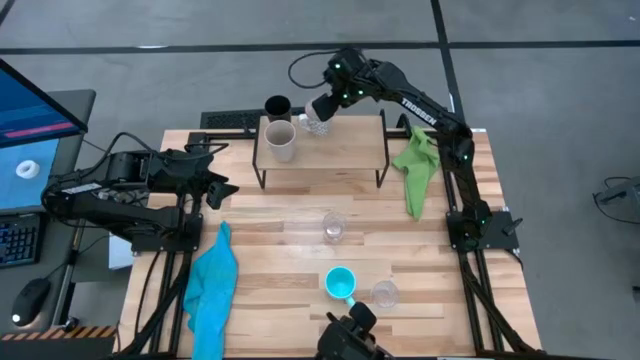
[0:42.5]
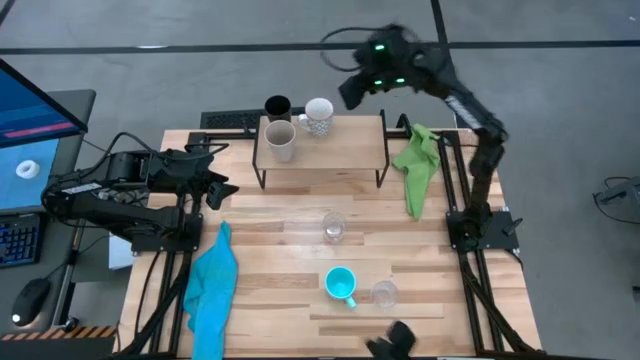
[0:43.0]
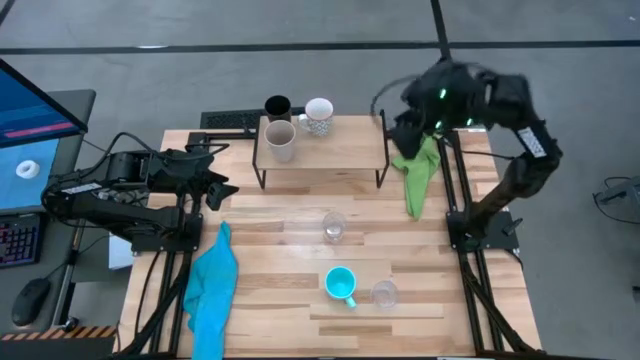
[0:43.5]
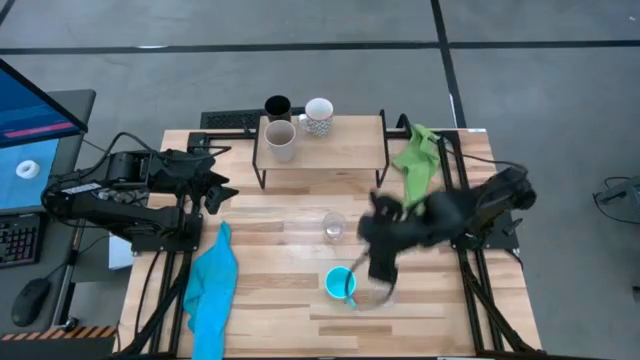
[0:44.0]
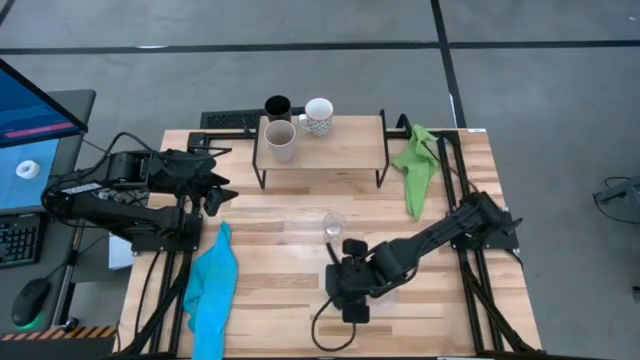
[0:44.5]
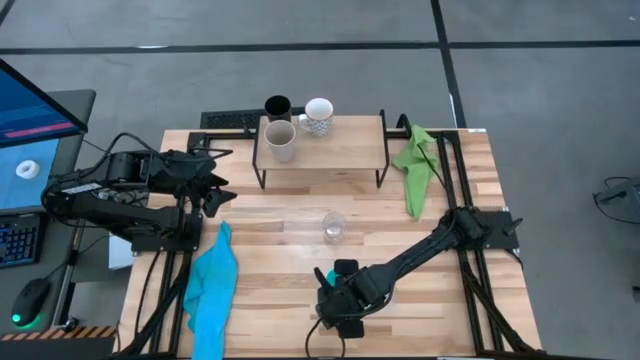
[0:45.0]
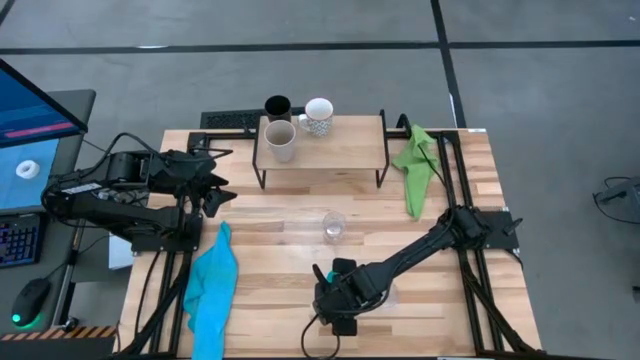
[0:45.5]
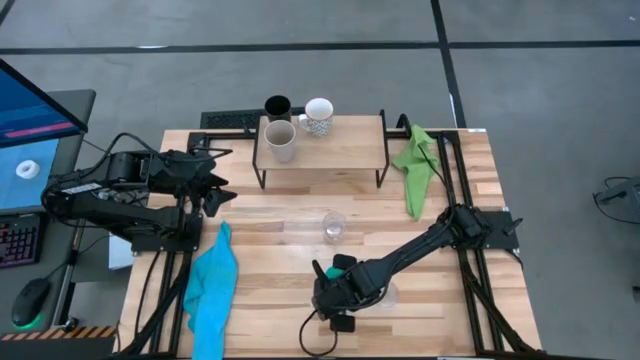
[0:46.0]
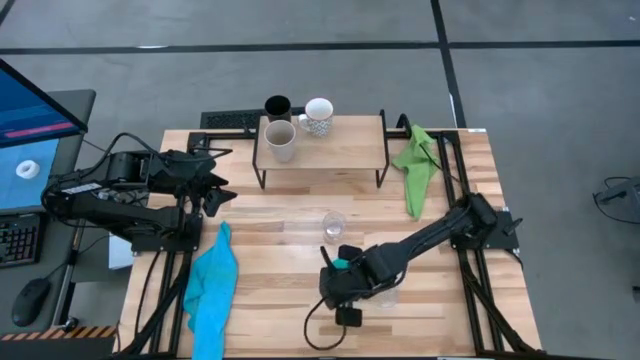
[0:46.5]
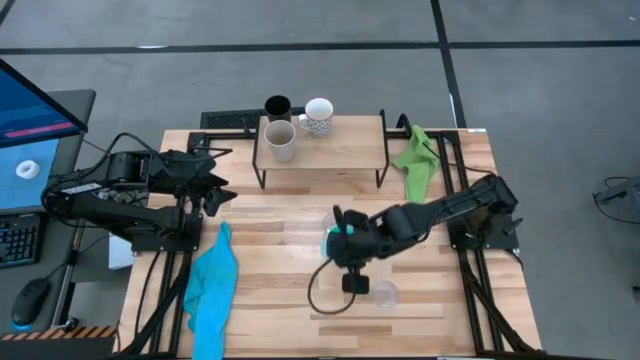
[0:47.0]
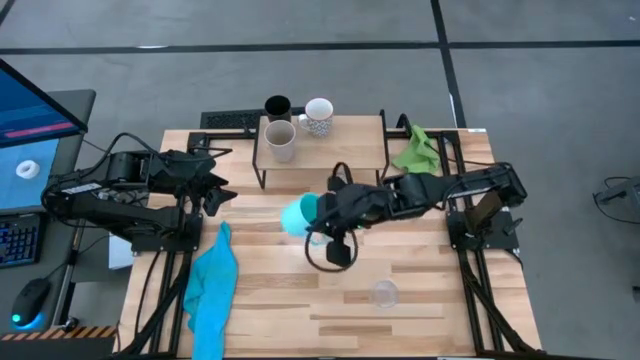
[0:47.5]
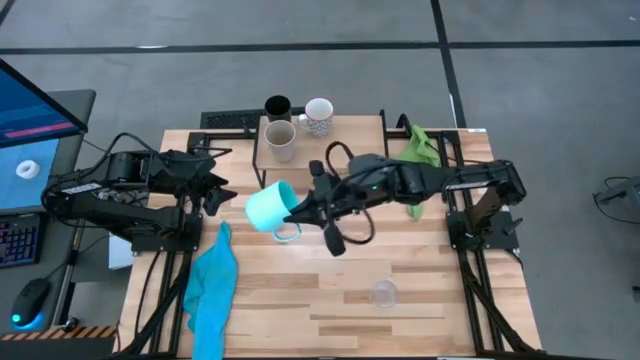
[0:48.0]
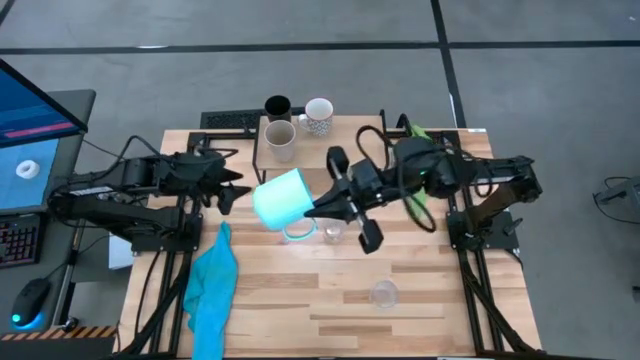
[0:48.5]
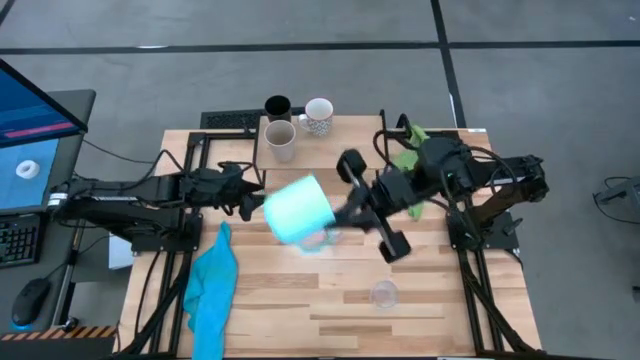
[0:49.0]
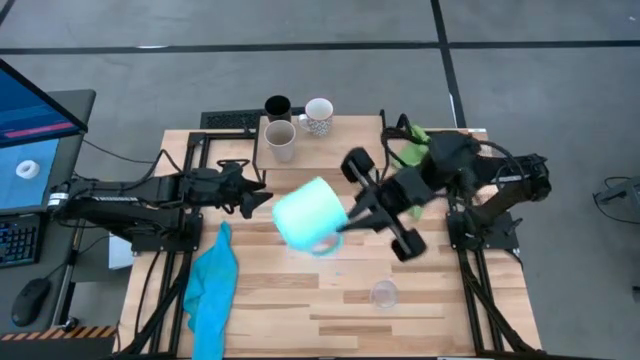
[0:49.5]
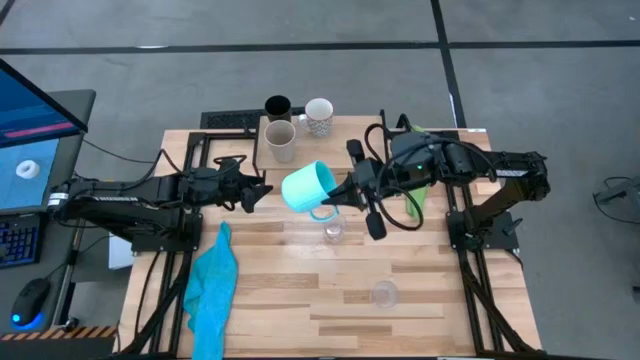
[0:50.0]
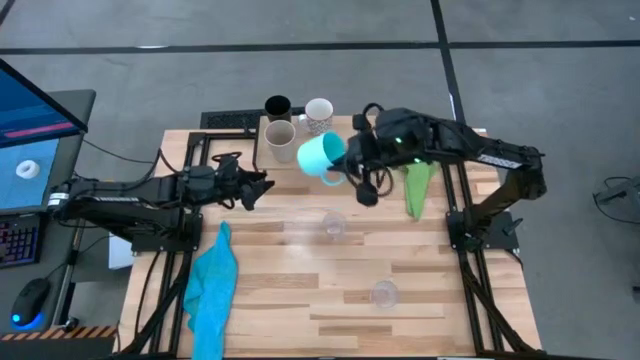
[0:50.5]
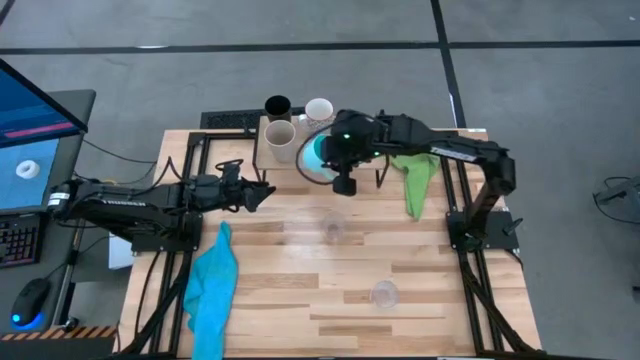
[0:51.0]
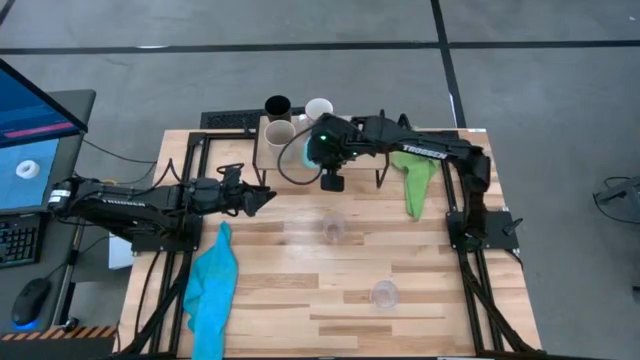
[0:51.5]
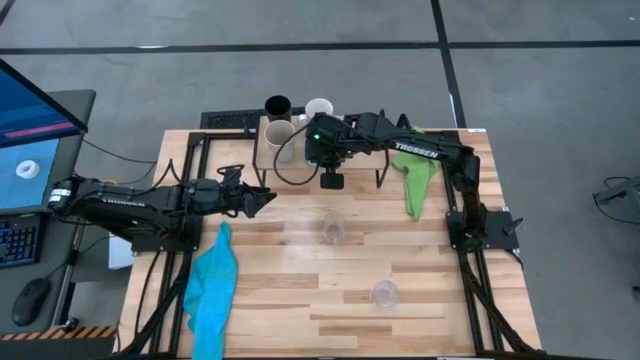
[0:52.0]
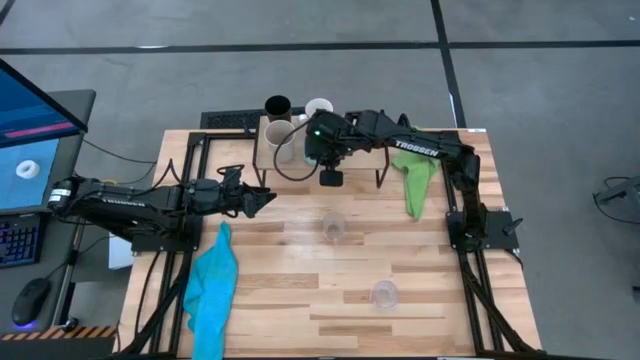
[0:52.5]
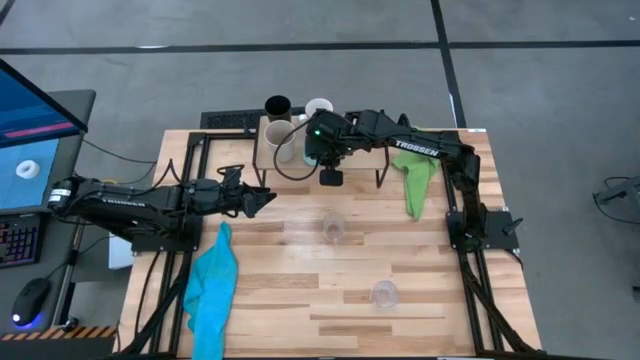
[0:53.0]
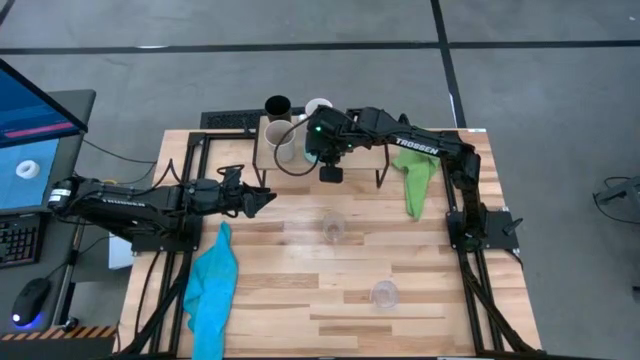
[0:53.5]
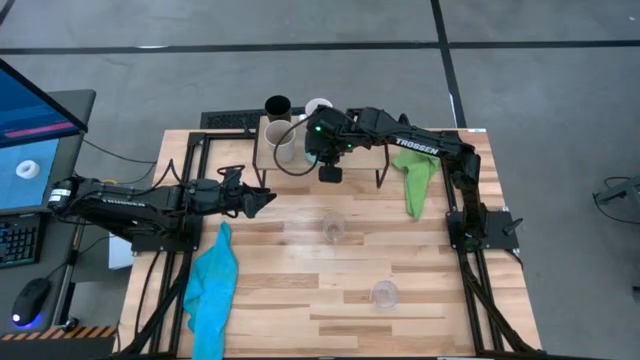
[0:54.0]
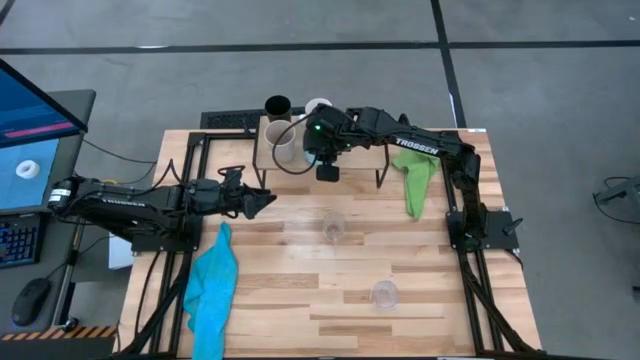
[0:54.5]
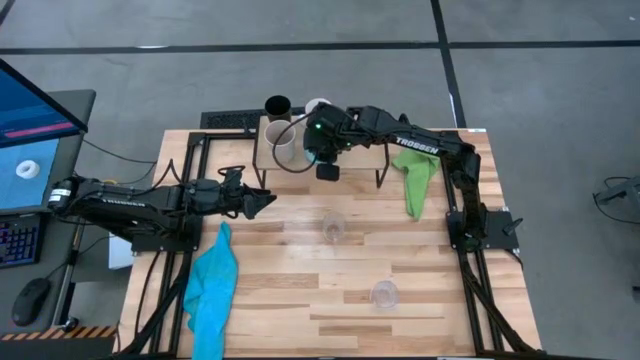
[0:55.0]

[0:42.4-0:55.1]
Task: Stack small to large cups/mugs on shelf
Put the blue mug on the shelf

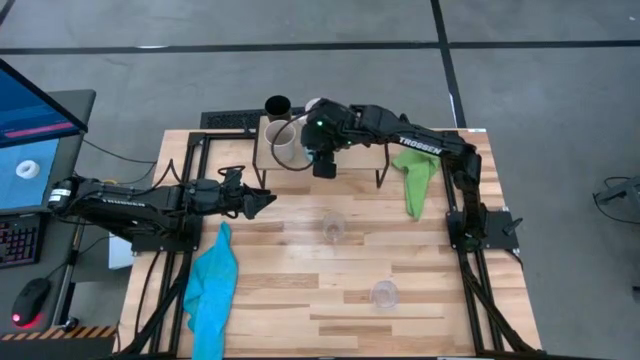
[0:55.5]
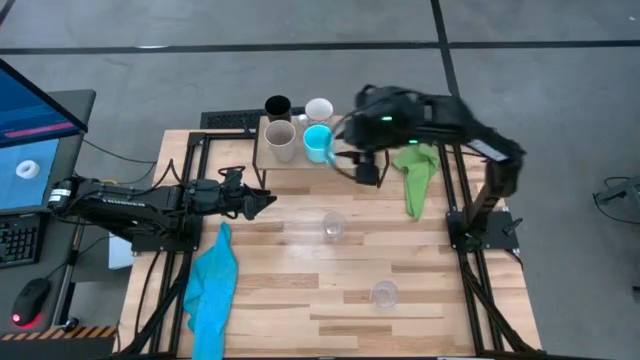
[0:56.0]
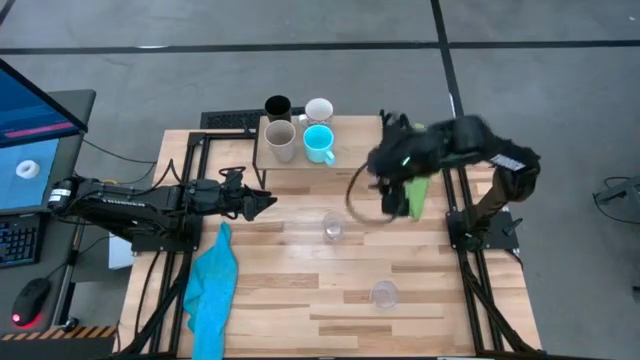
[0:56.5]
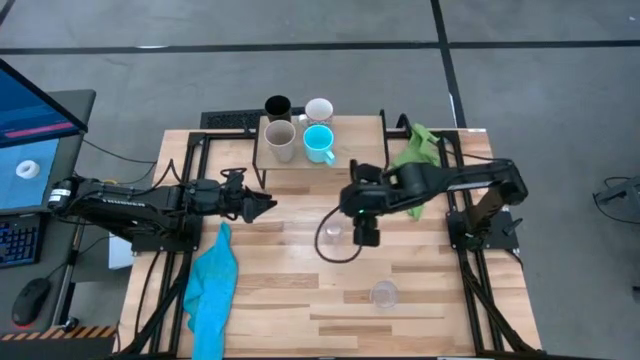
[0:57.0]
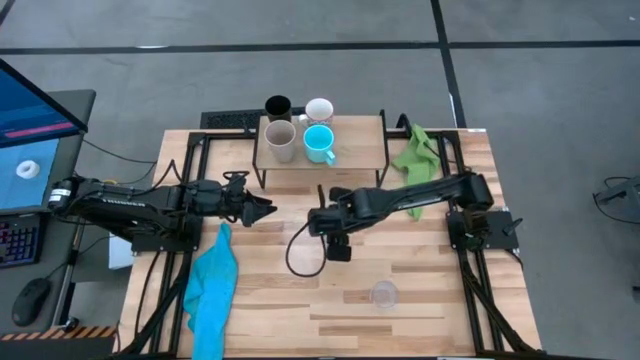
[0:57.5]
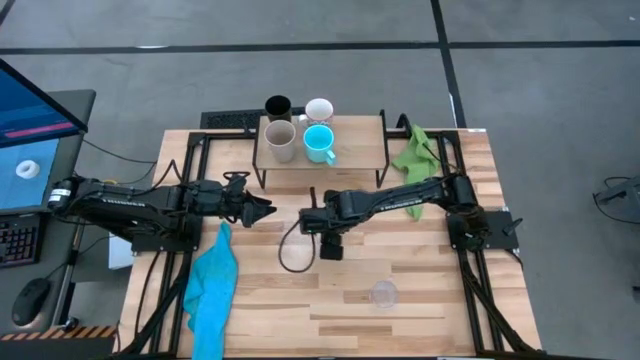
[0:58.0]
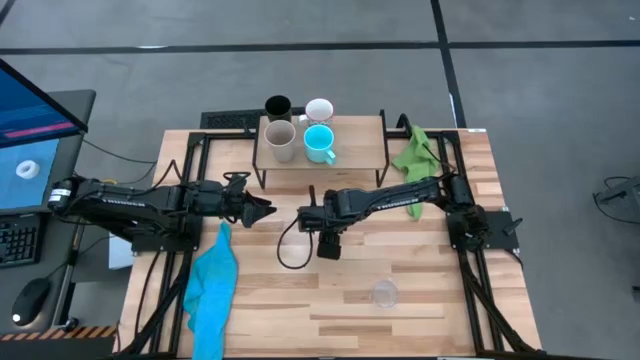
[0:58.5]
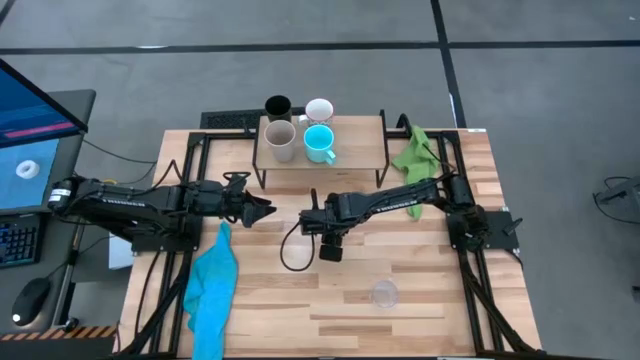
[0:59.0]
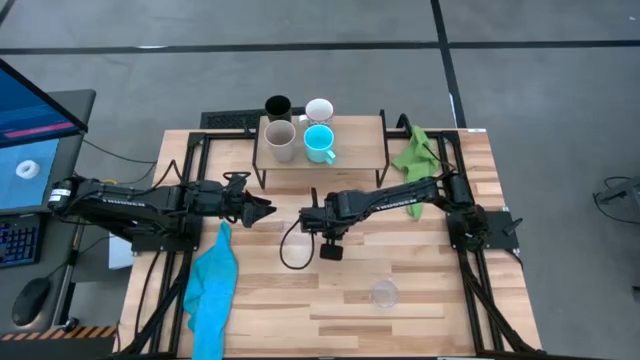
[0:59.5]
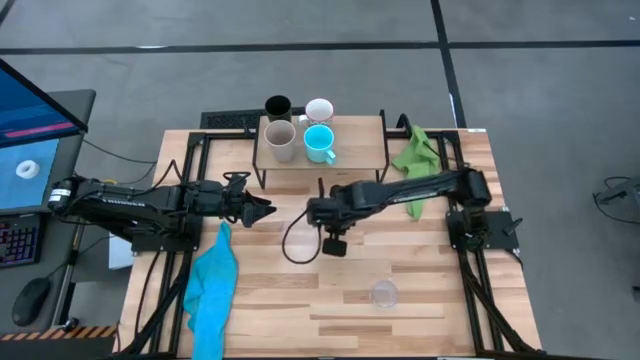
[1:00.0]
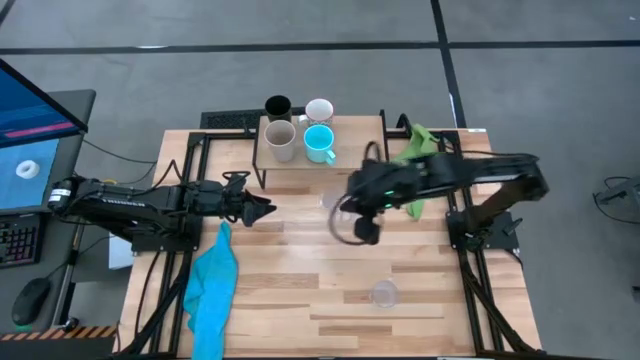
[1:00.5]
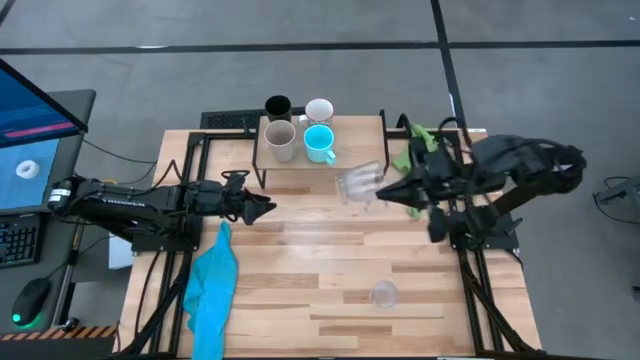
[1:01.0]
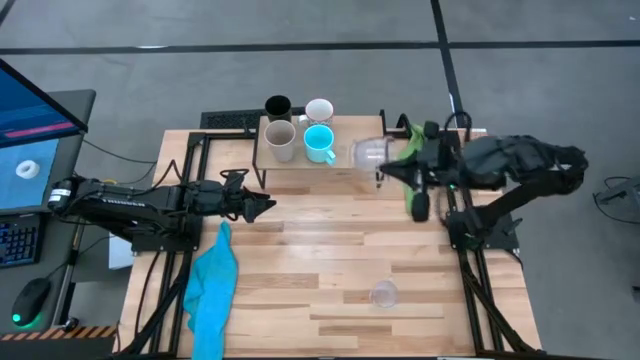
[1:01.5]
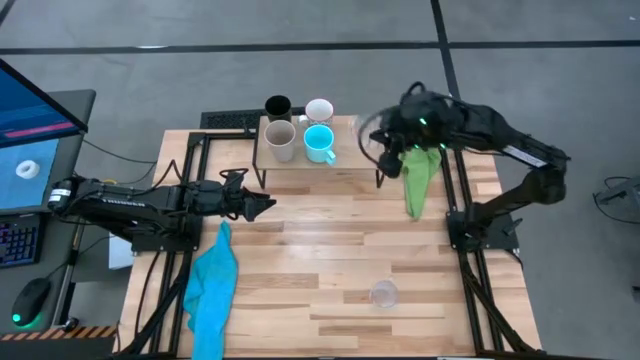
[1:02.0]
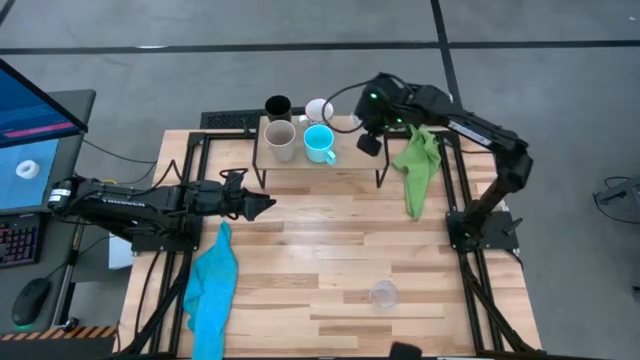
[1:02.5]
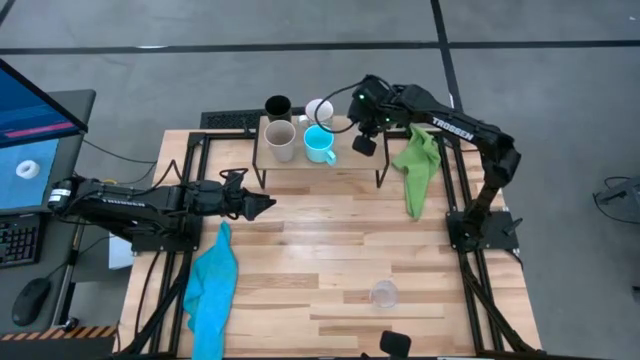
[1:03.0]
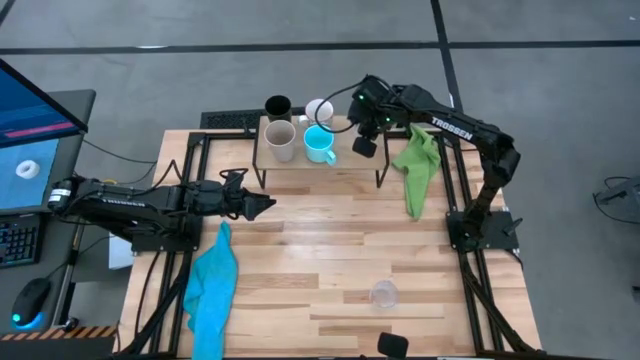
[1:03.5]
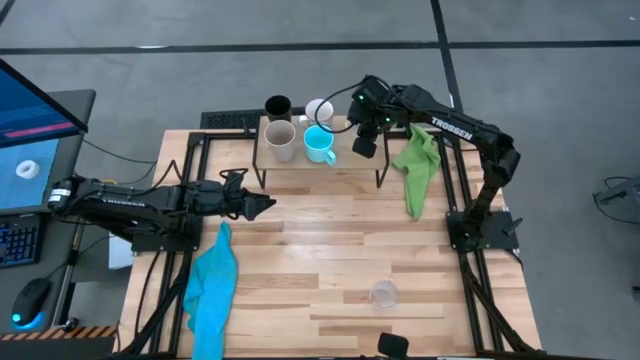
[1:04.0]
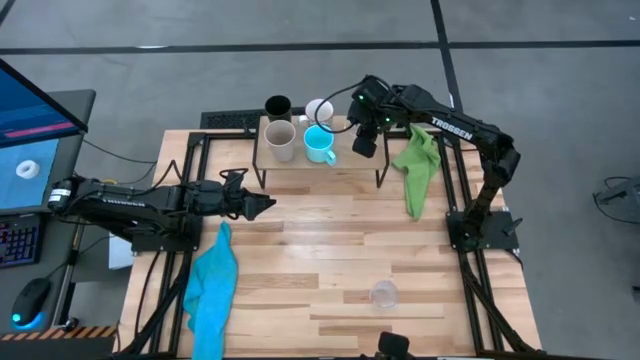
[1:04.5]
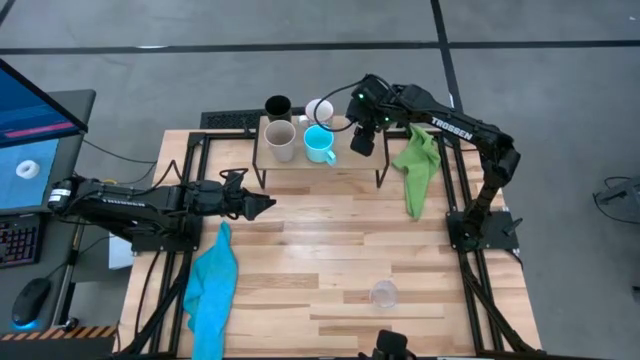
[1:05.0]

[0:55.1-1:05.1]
Put the top transparent mug on the shelf
